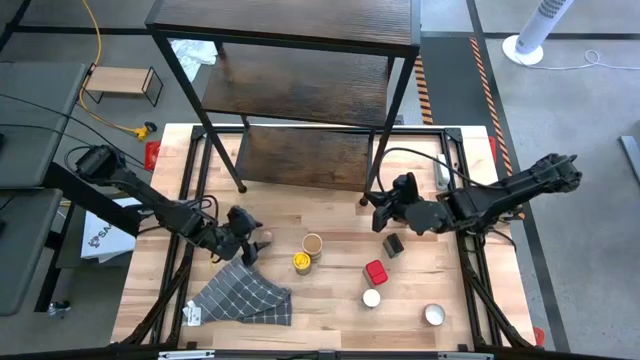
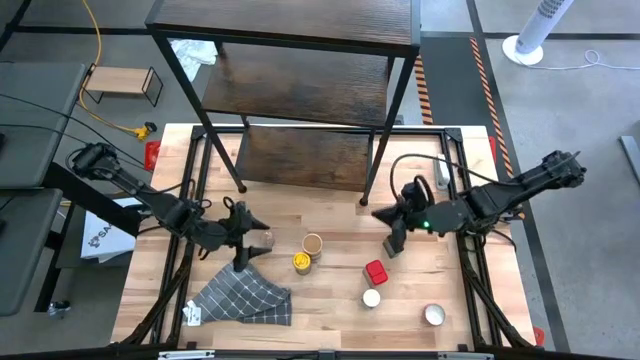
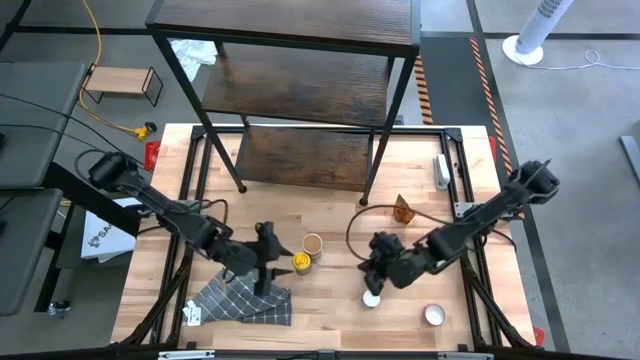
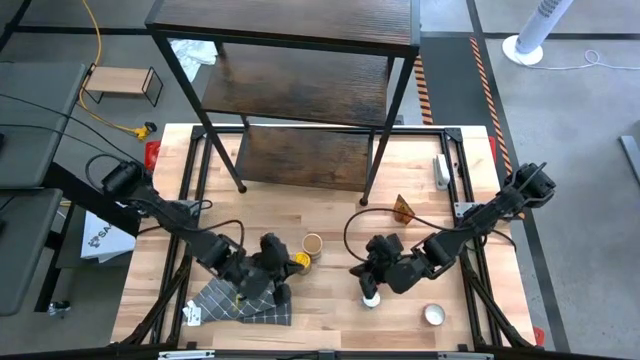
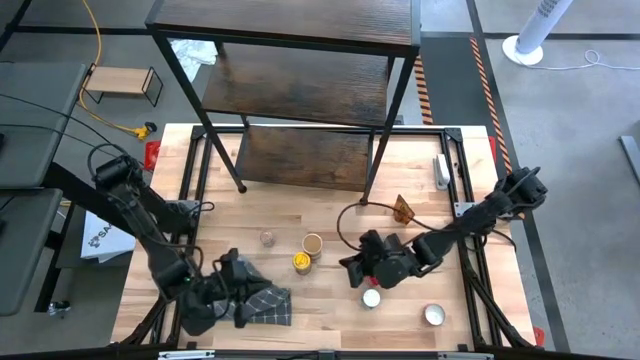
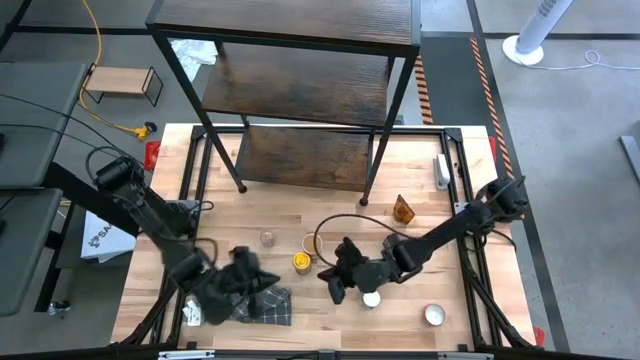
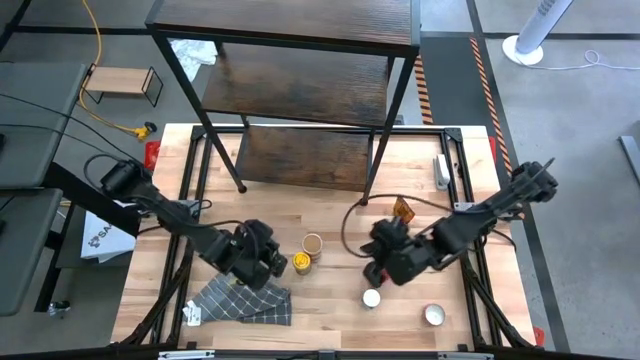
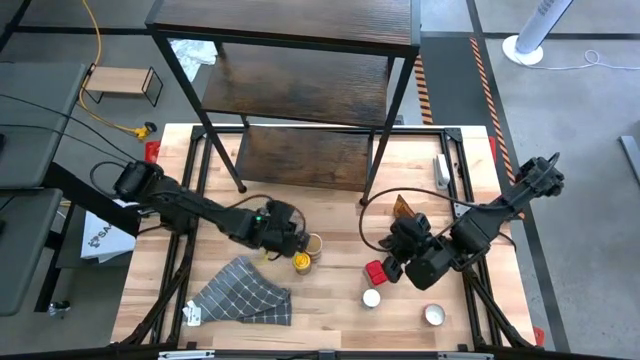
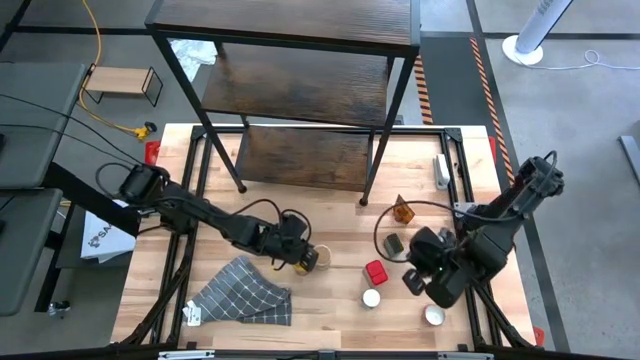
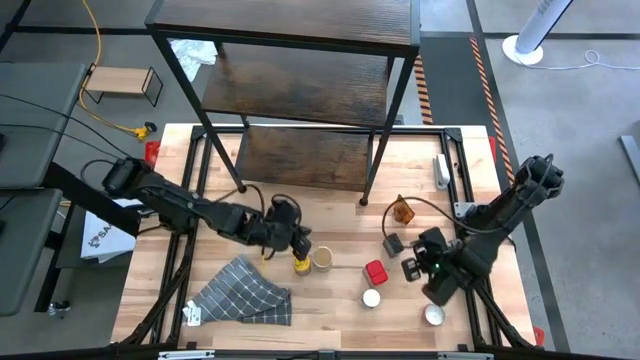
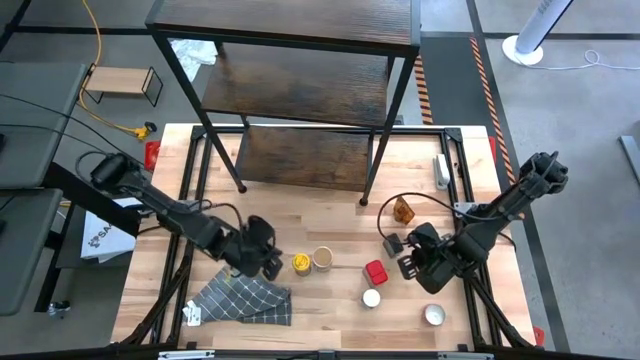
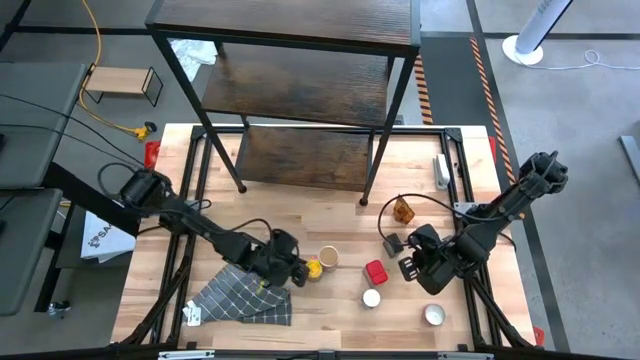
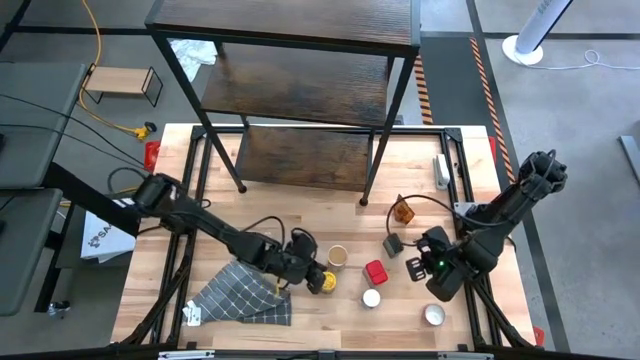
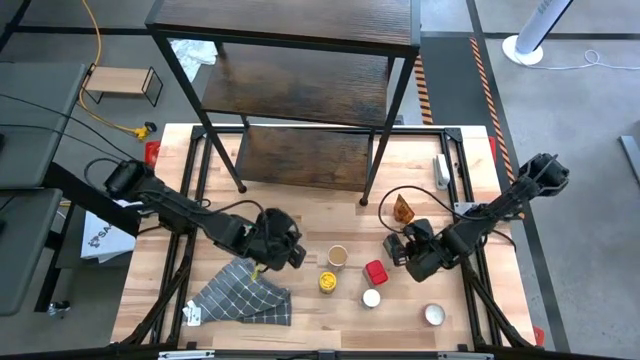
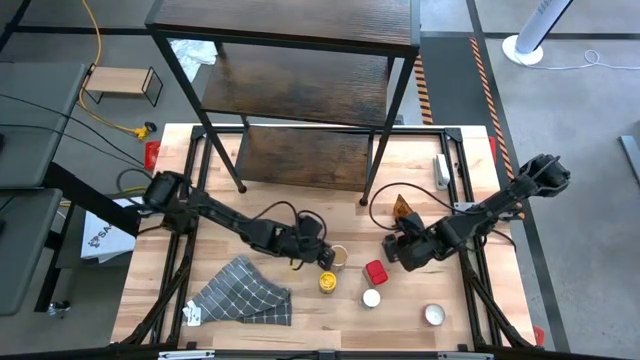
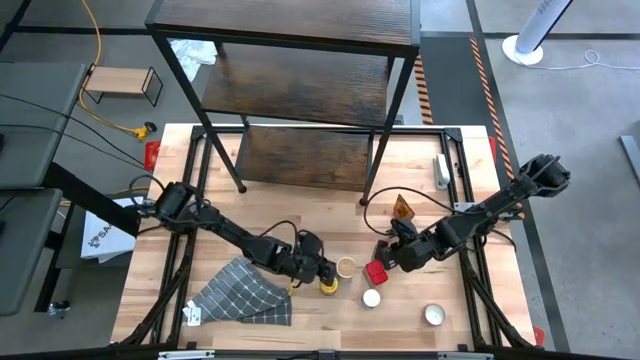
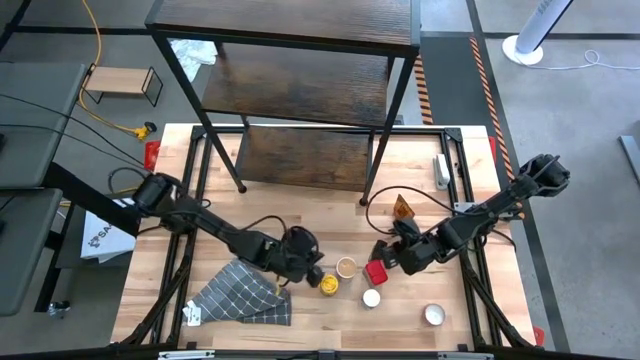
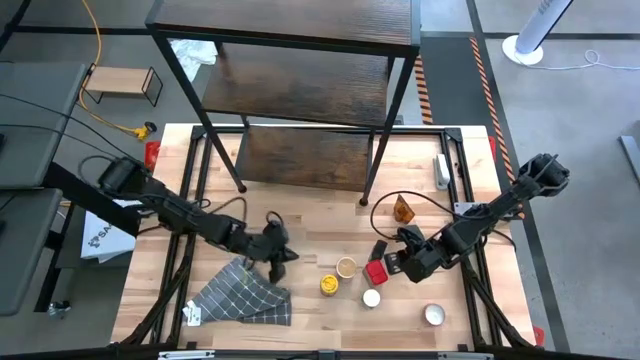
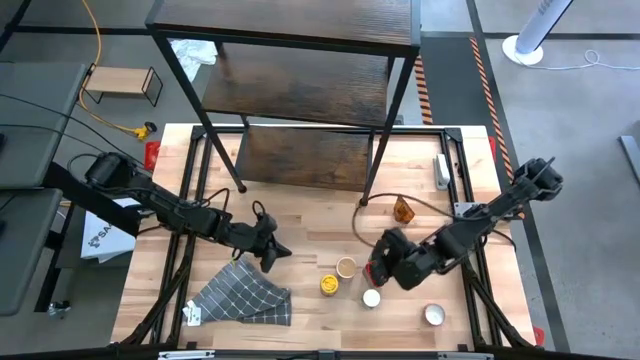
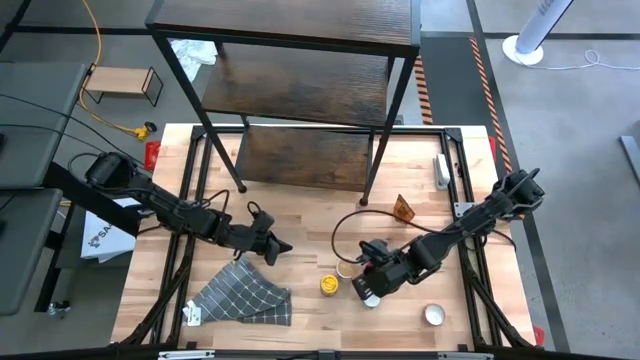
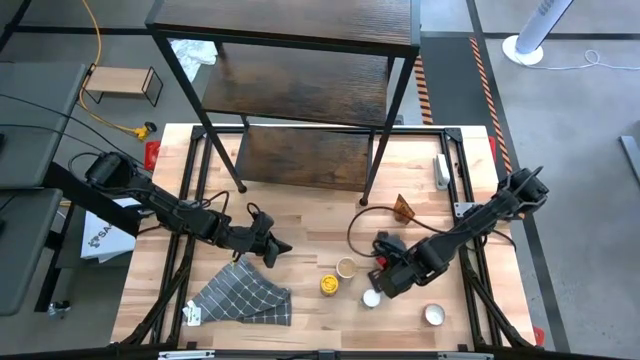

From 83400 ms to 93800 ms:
Task: Shelf spices
Adjust the seasoning bottles and cans

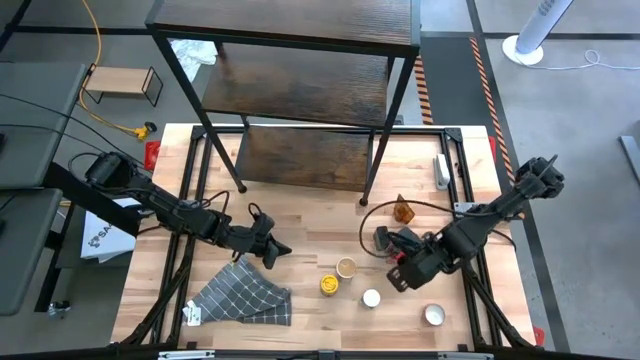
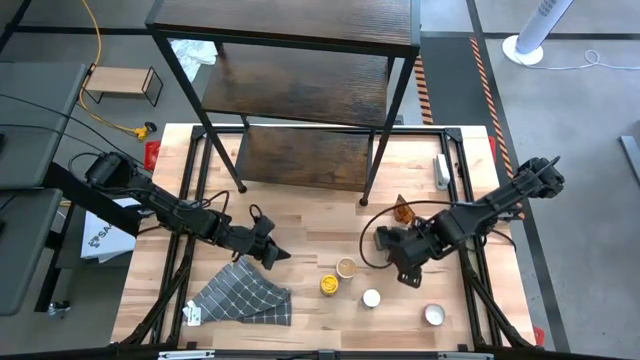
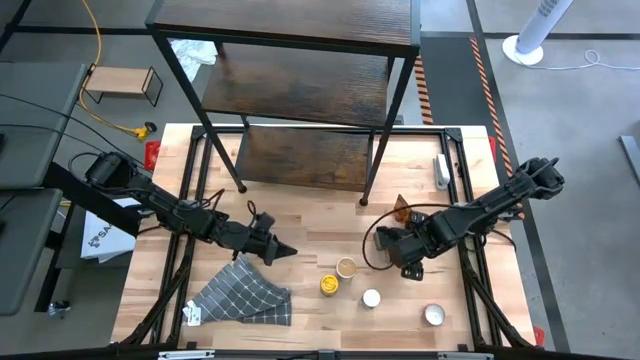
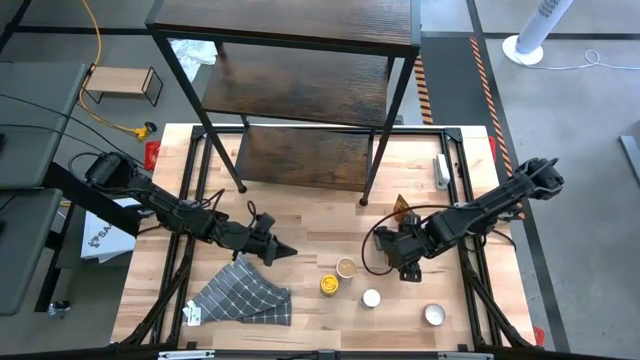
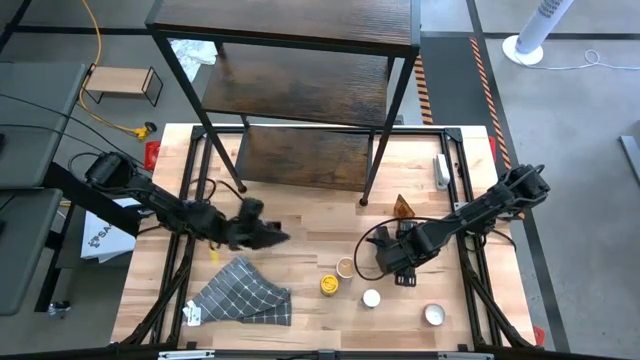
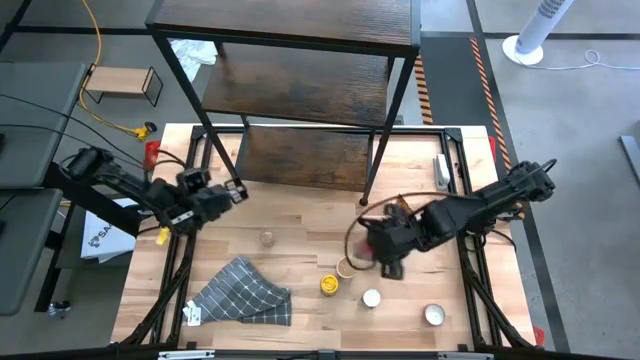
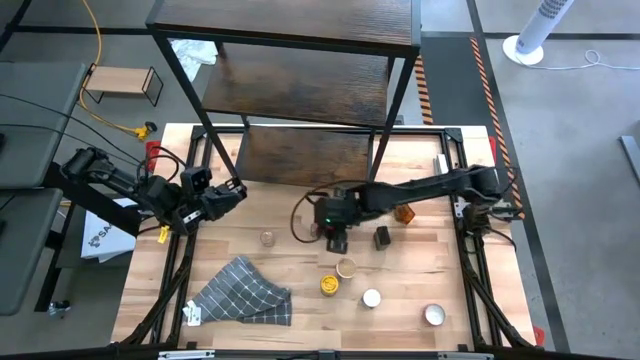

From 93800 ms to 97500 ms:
Move the red seasoning can to the center of the table

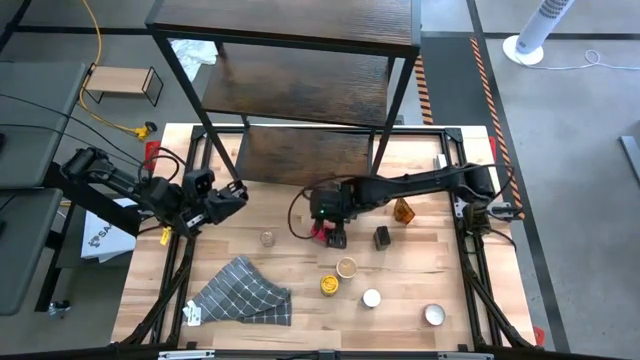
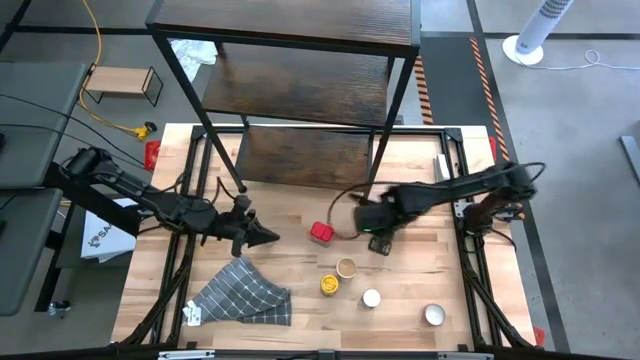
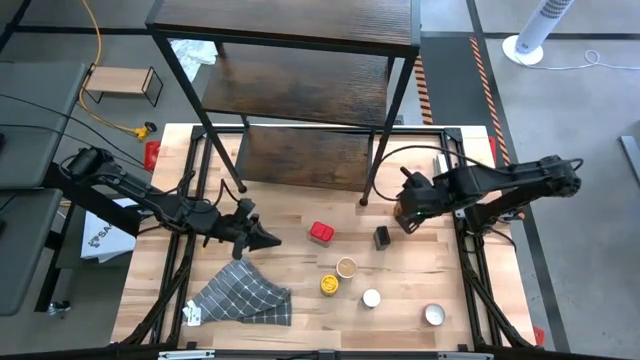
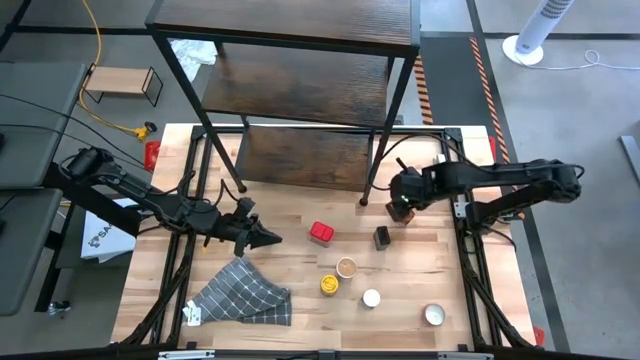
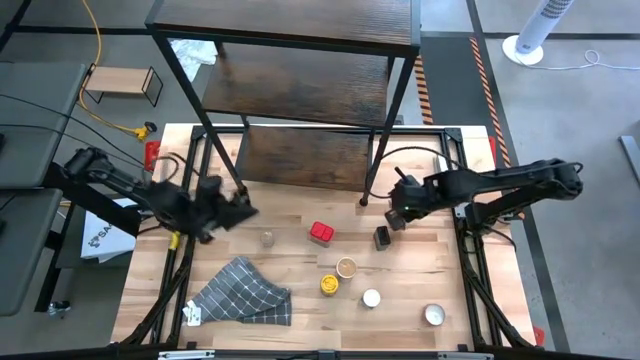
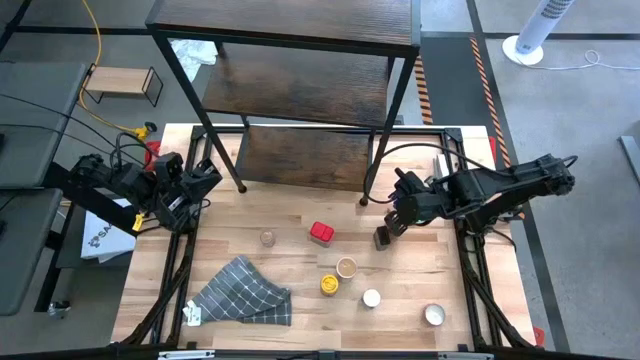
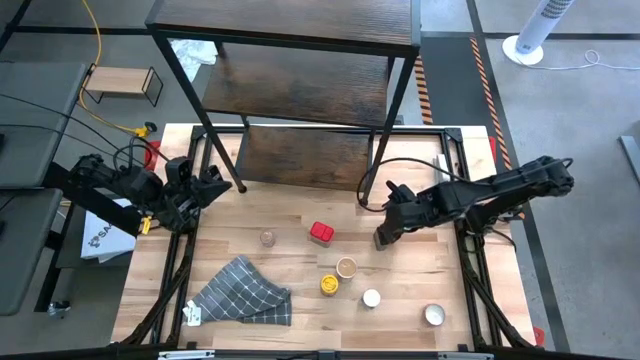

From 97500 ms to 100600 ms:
Move the orange seasoning pack to the center of the table

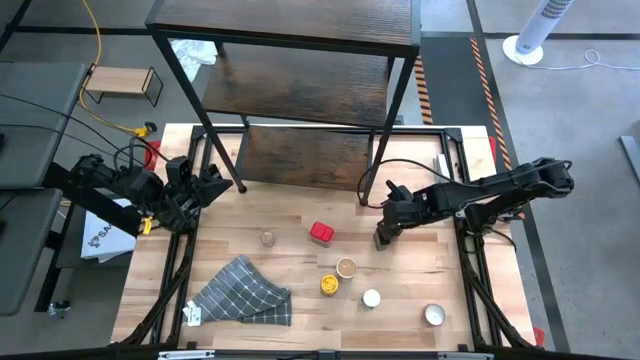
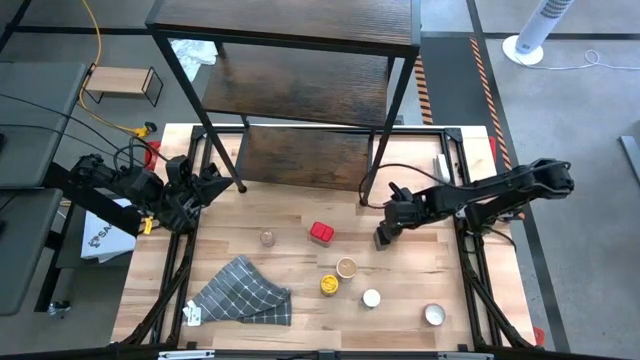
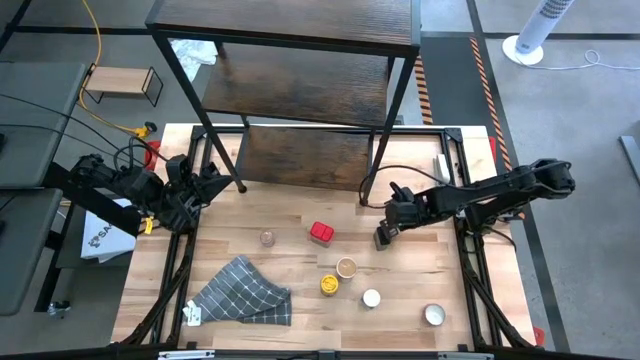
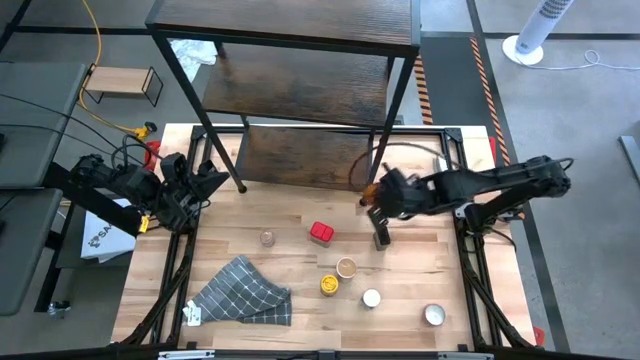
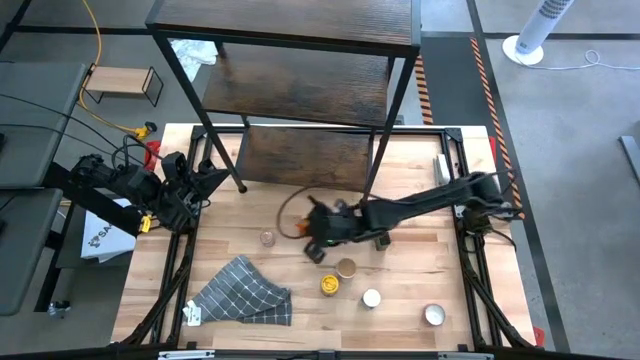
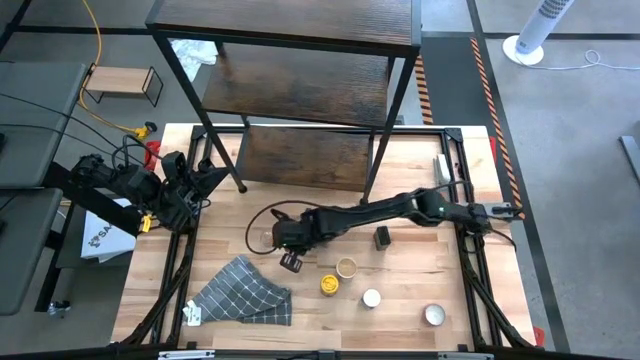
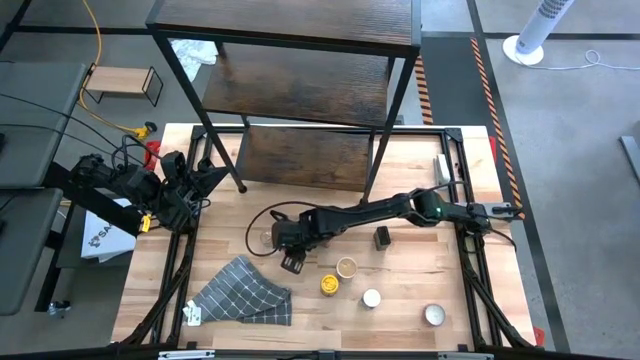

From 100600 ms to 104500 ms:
Move the orange seasoning pack to the center of the table
